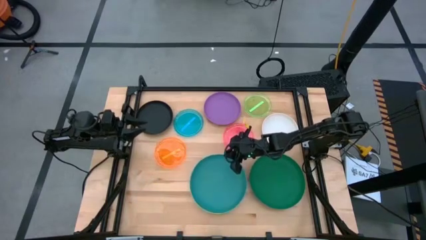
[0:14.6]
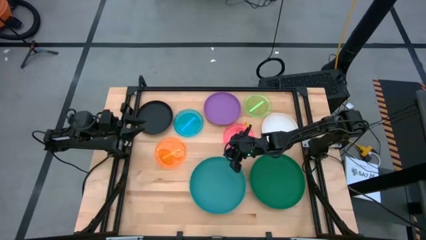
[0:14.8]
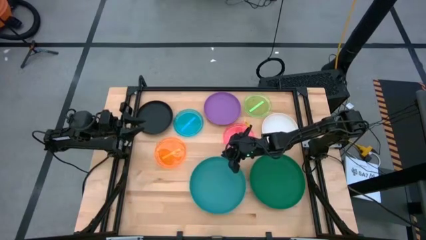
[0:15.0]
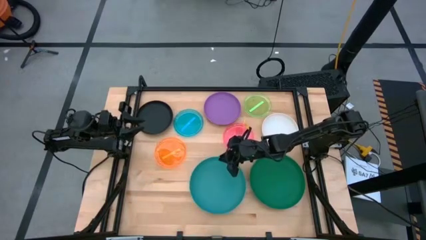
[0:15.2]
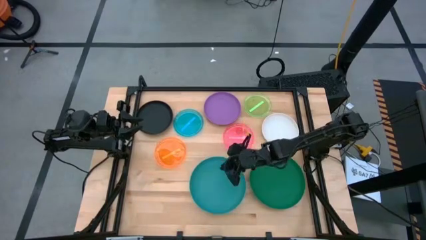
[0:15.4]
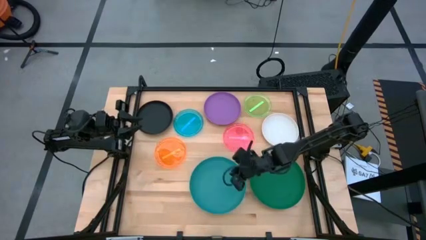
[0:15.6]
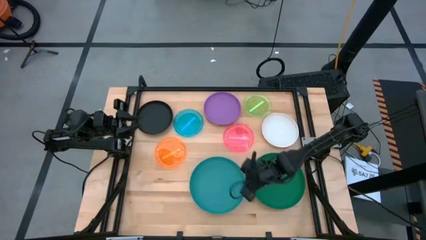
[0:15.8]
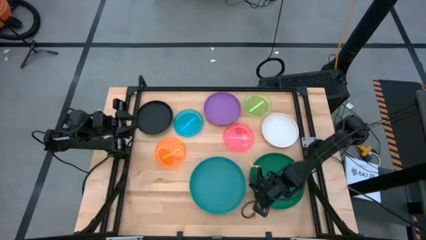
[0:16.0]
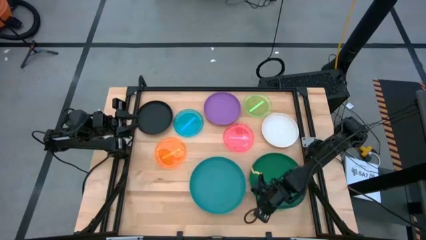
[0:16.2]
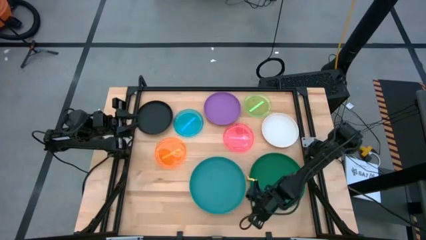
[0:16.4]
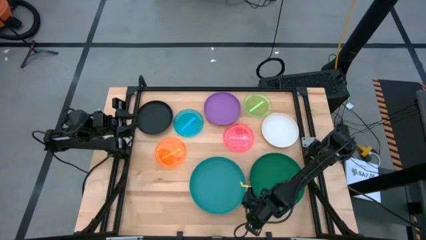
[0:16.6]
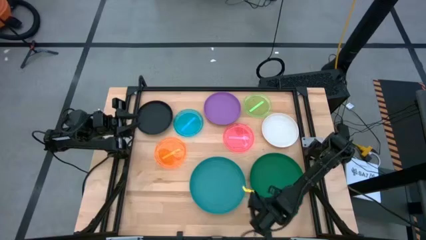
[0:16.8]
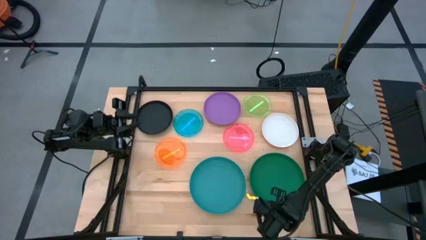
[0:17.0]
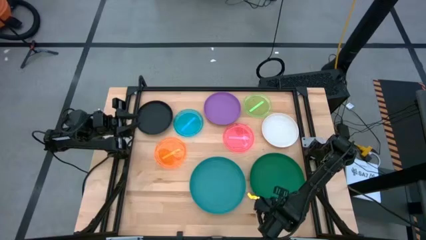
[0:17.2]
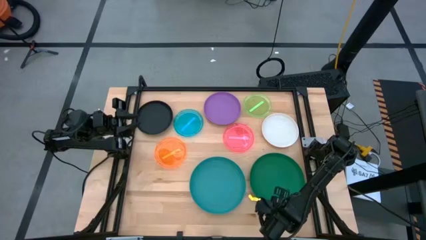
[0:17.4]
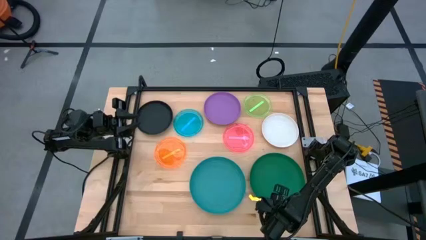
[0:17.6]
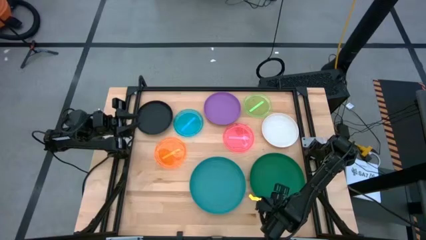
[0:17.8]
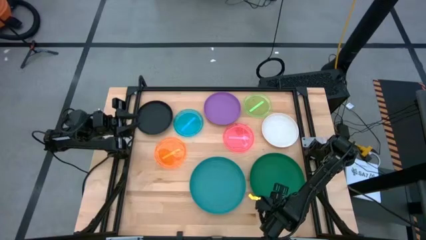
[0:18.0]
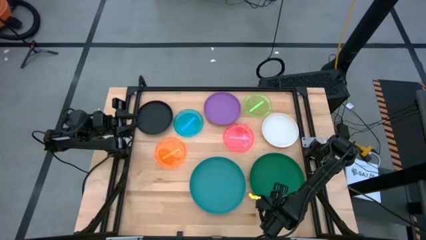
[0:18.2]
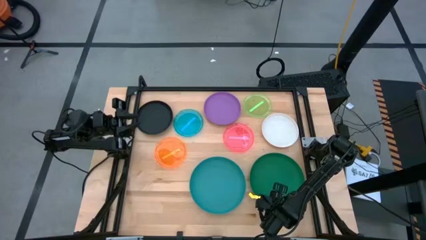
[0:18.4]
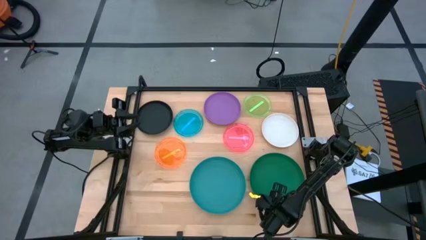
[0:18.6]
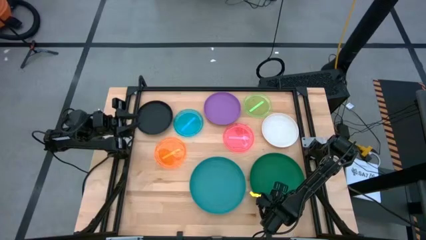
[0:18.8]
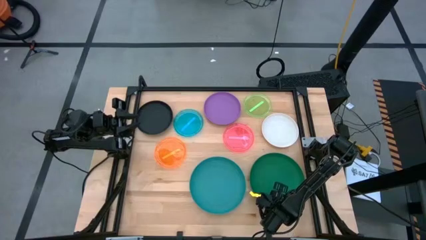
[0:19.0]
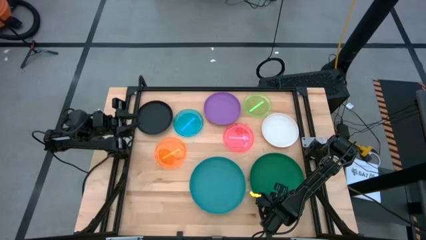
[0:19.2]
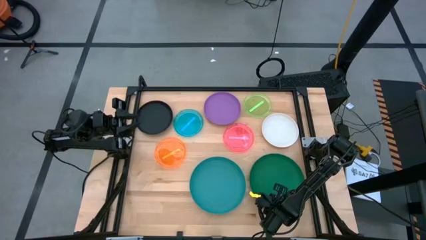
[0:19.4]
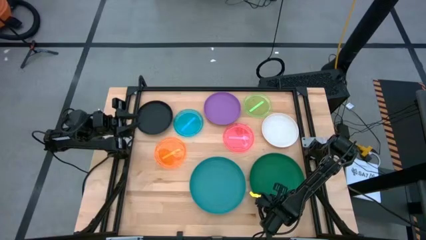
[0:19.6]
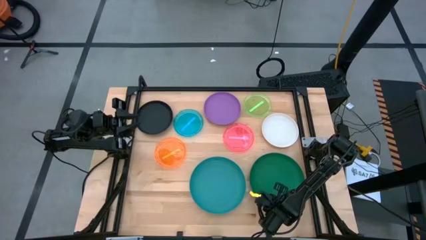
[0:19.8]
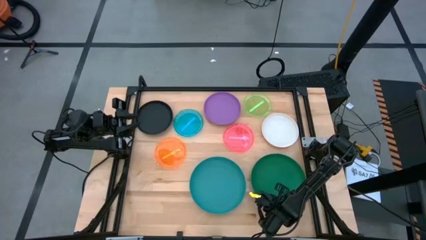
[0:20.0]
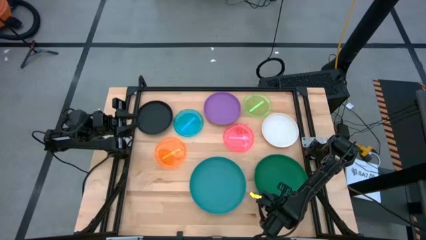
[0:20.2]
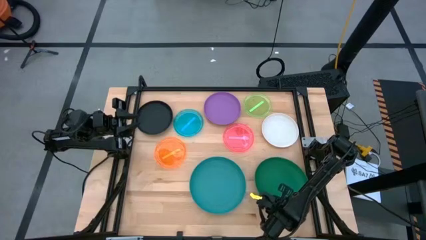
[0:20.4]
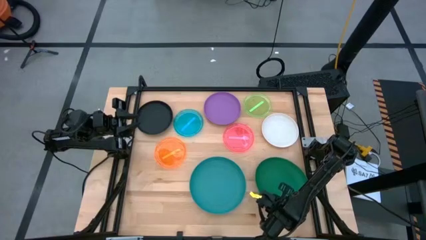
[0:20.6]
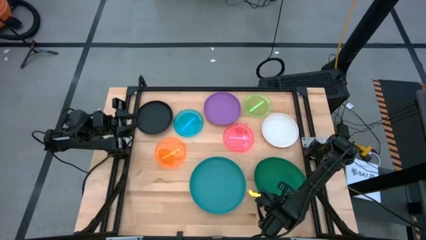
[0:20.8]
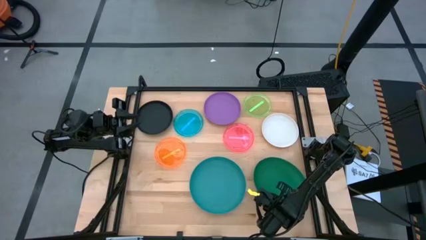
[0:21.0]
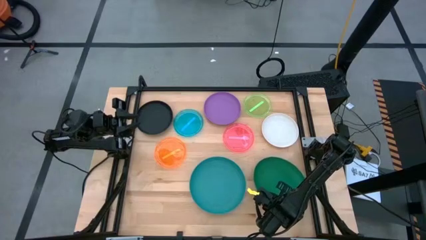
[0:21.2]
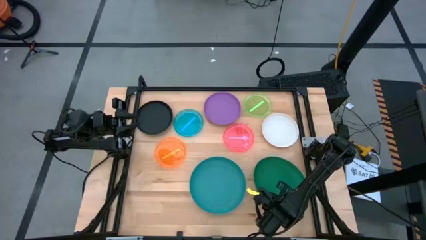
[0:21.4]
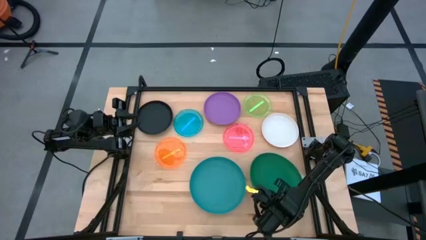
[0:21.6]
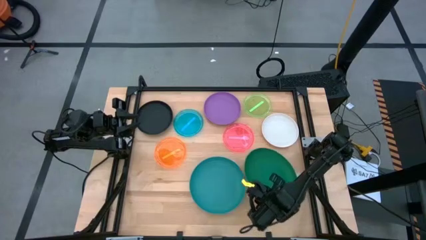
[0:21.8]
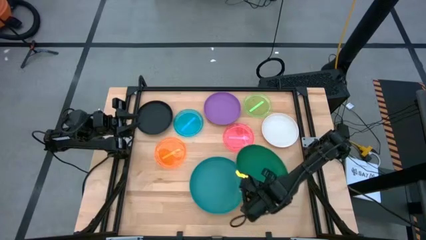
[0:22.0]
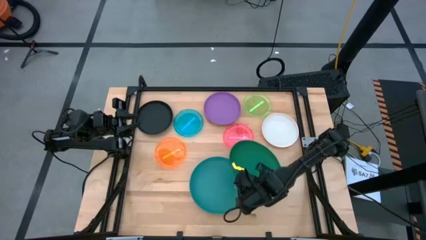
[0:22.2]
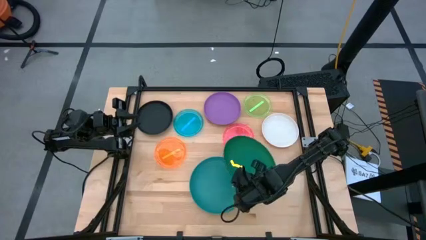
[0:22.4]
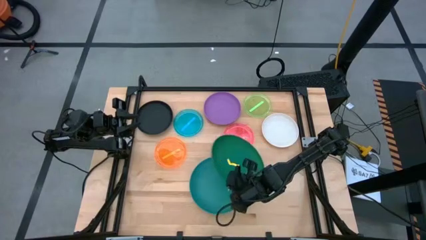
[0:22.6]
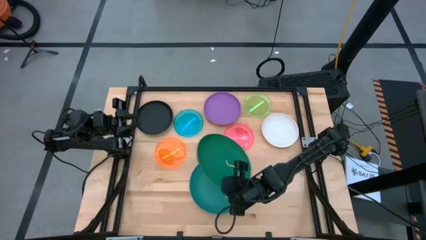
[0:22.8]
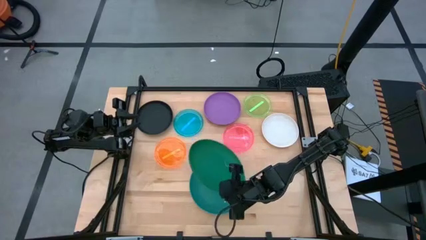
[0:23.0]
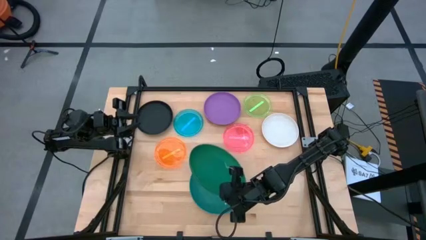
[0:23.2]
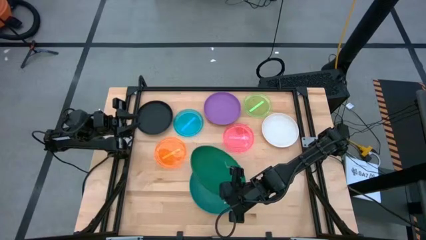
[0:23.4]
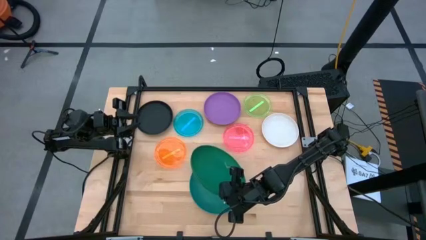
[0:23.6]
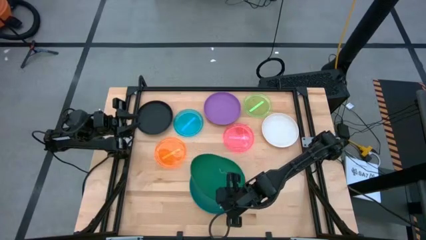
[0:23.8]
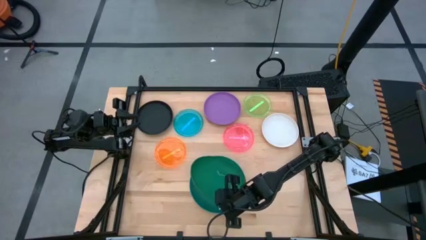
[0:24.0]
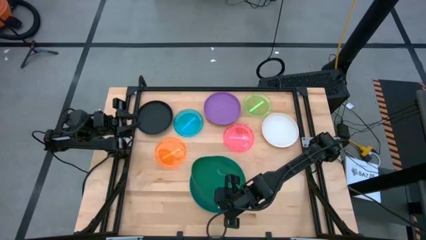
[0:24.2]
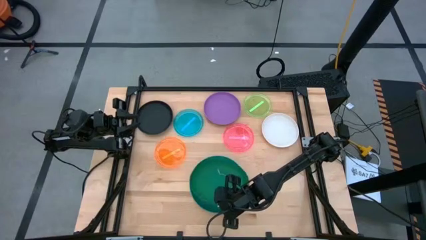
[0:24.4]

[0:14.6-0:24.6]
Task: Stack plastic plates
Stack the dark green plate on top of the blue plate

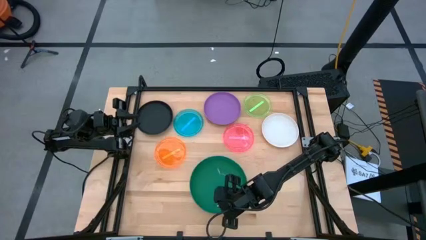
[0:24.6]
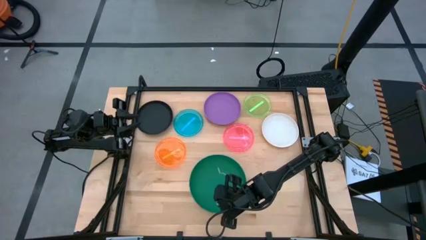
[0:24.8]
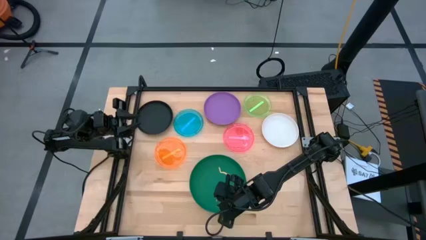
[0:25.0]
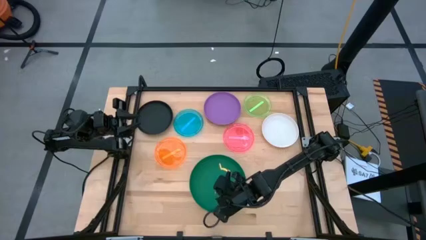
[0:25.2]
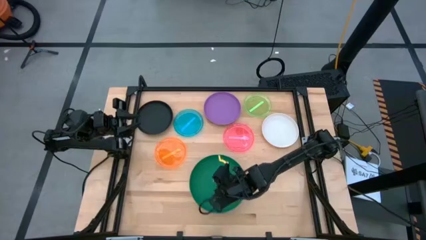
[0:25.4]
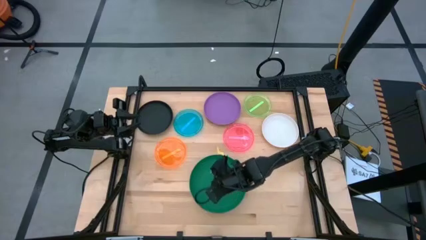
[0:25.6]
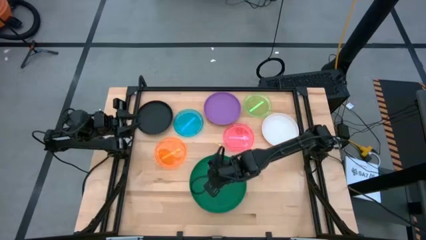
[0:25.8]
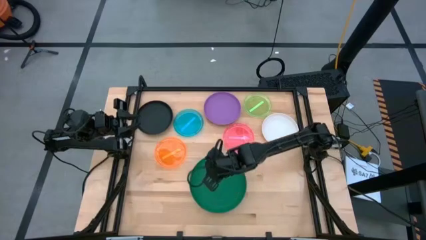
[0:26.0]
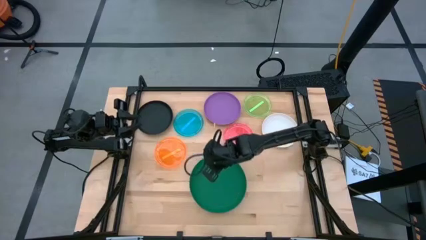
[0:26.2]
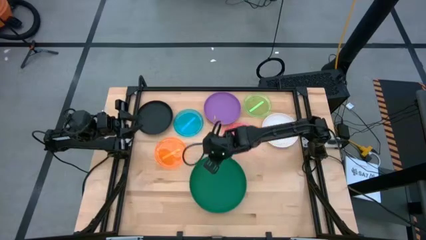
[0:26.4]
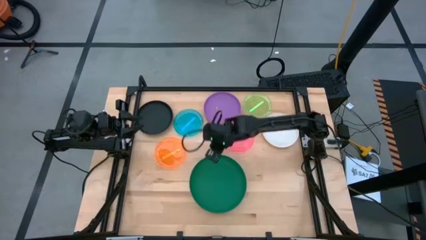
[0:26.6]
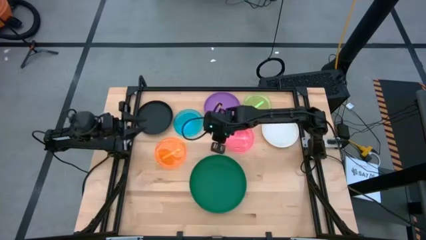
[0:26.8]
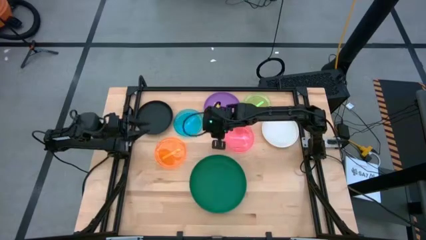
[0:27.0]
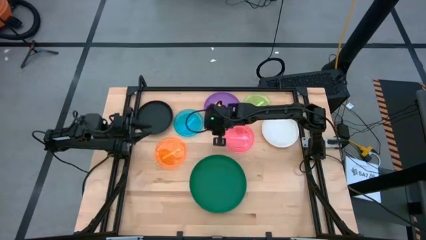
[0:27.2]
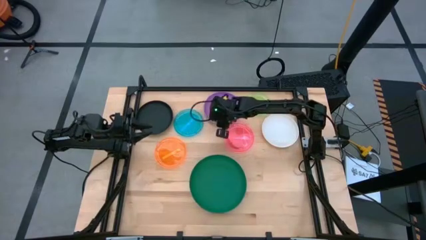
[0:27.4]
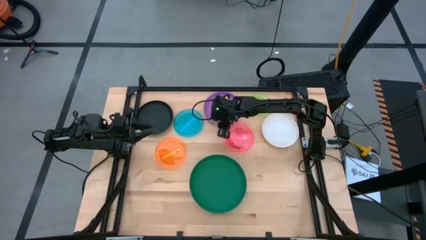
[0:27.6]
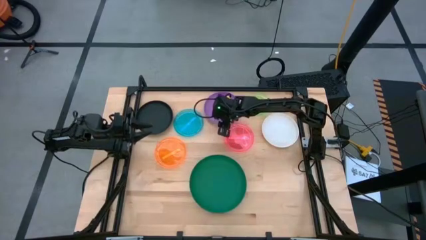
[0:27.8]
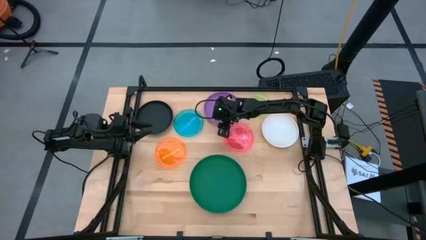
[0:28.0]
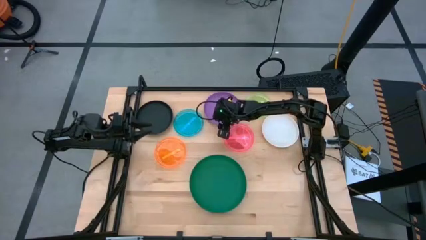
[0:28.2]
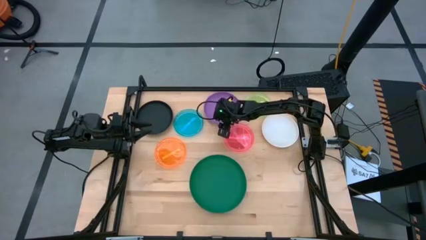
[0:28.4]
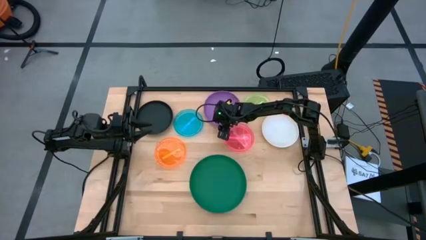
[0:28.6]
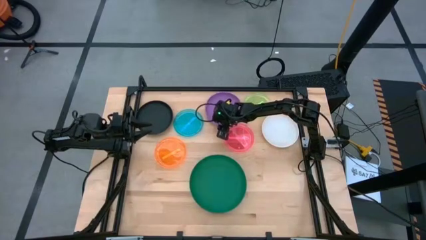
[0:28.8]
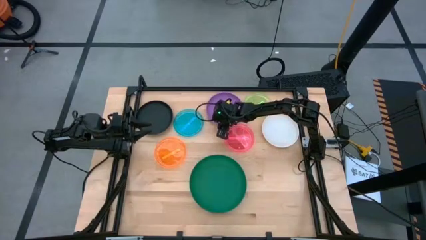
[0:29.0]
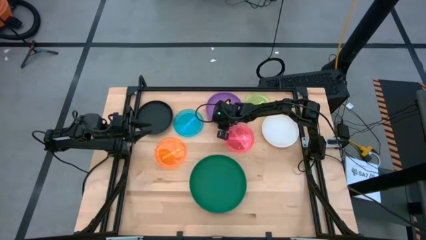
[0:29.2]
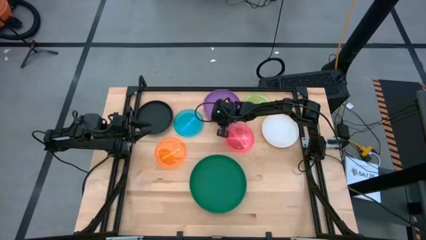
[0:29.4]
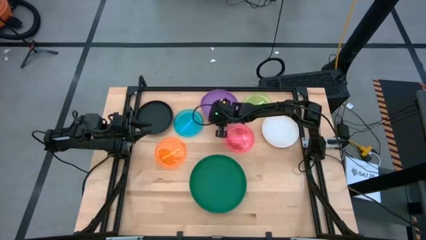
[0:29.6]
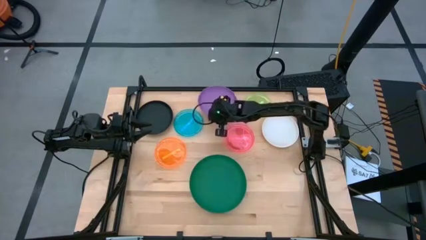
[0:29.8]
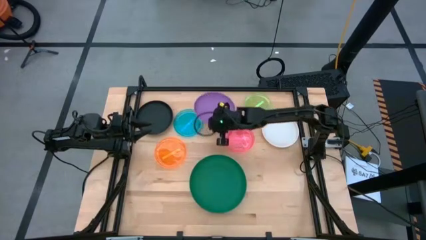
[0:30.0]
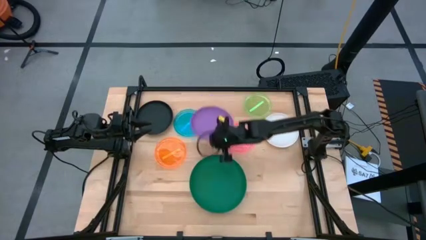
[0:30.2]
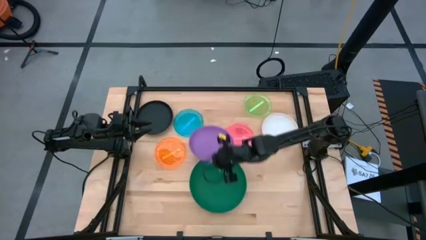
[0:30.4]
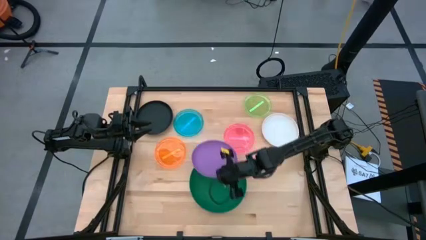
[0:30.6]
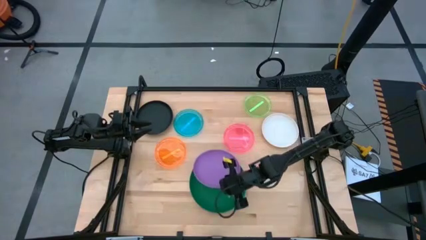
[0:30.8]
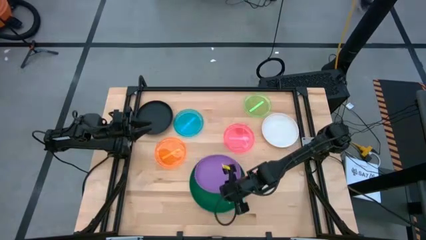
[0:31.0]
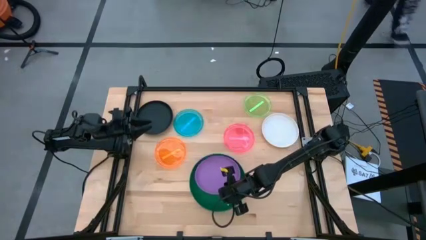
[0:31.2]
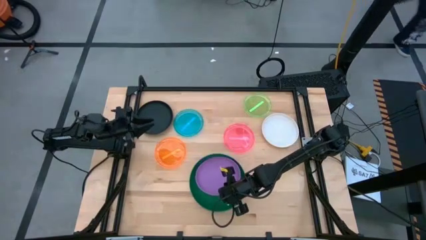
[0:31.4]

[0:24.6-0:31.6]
Stack the purple plate on top of the dark green plate
